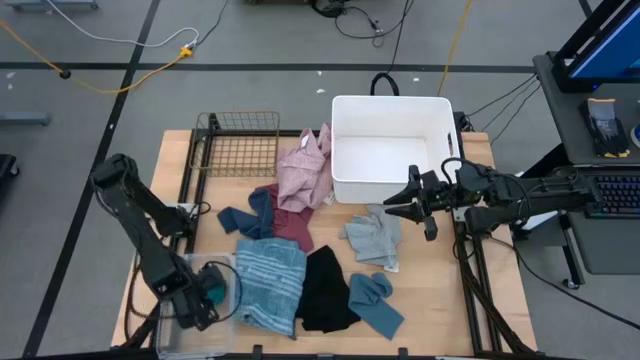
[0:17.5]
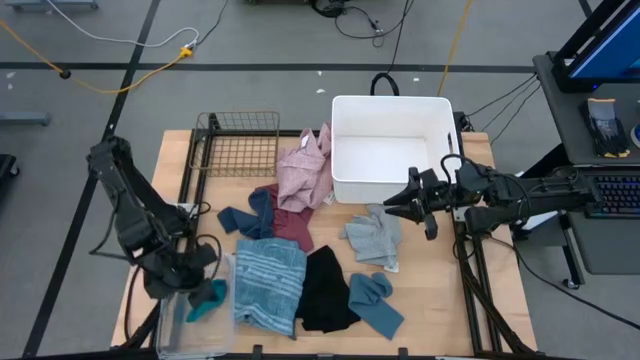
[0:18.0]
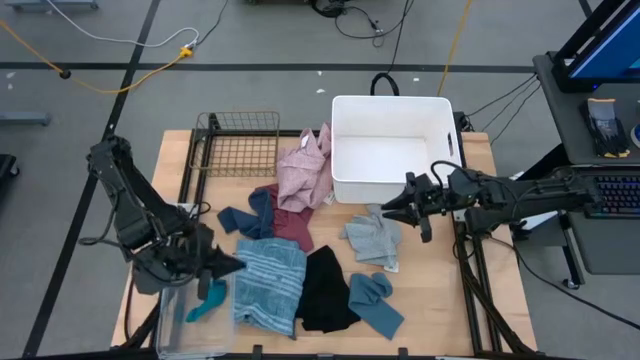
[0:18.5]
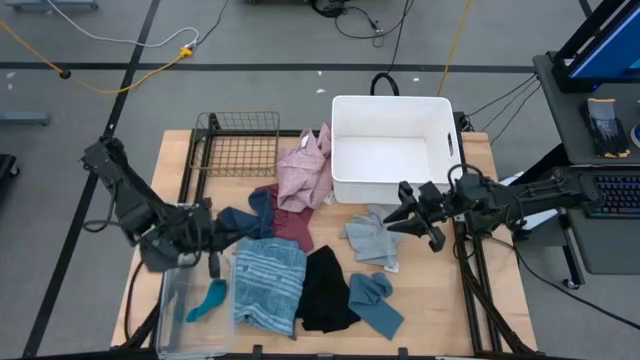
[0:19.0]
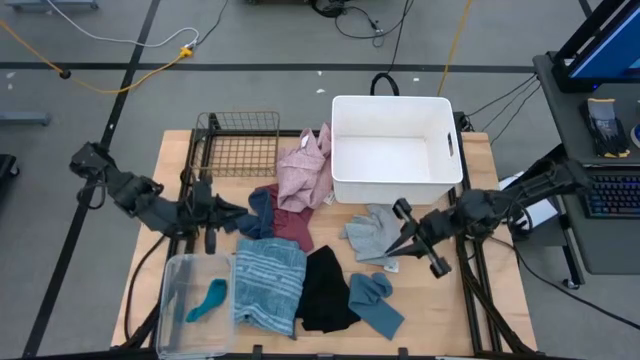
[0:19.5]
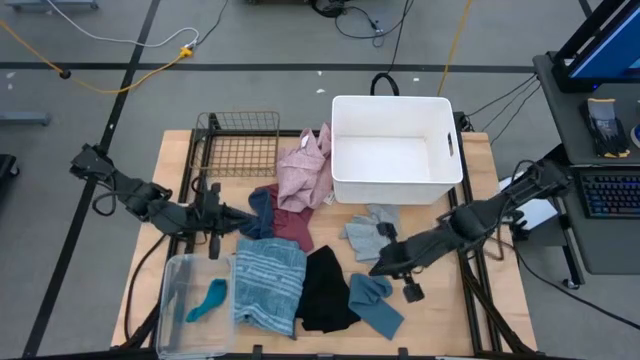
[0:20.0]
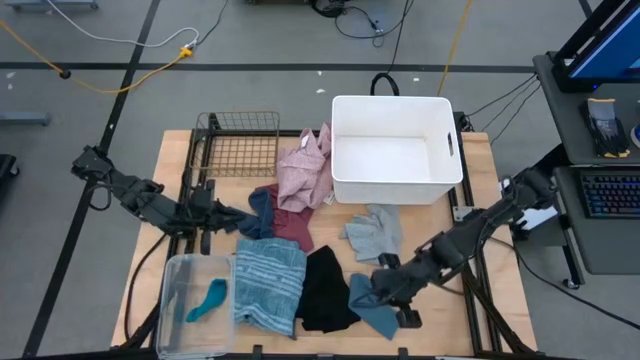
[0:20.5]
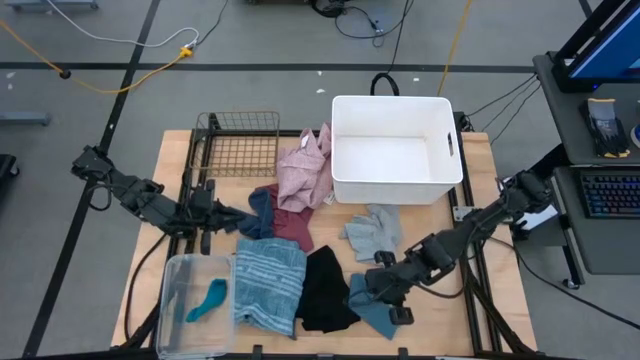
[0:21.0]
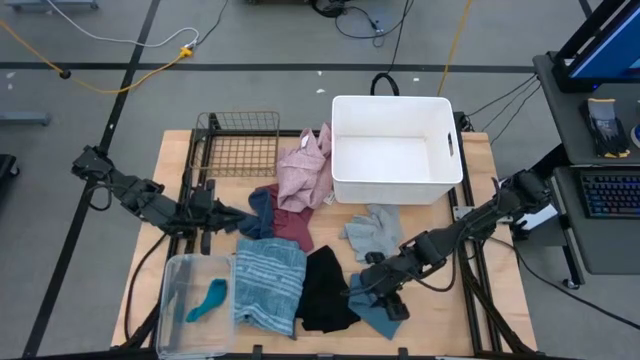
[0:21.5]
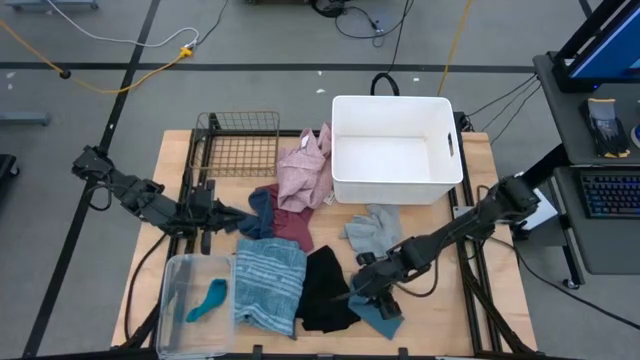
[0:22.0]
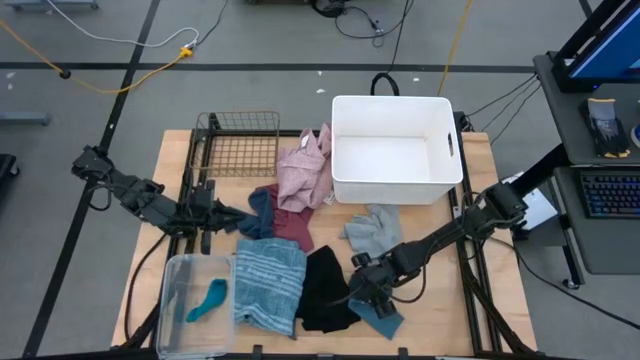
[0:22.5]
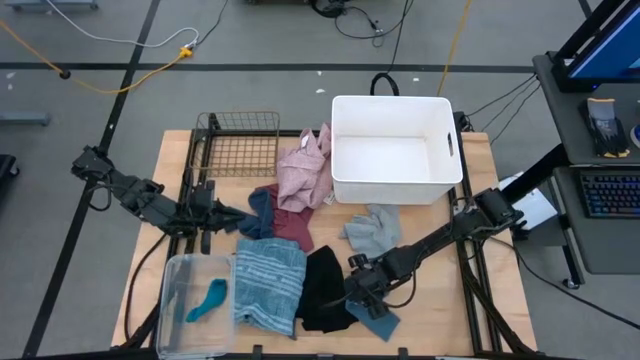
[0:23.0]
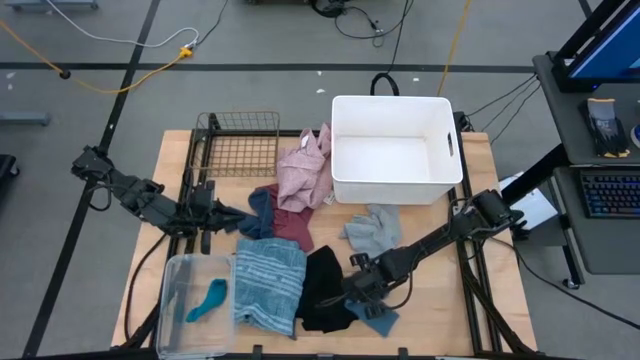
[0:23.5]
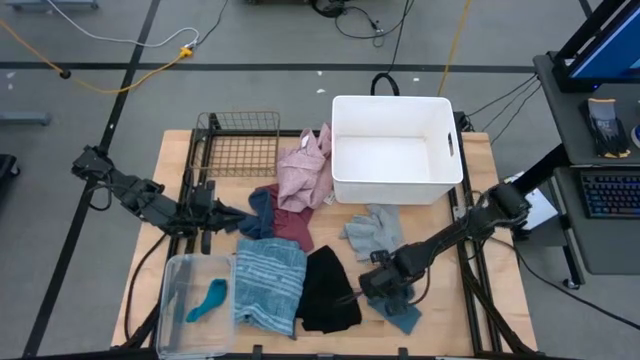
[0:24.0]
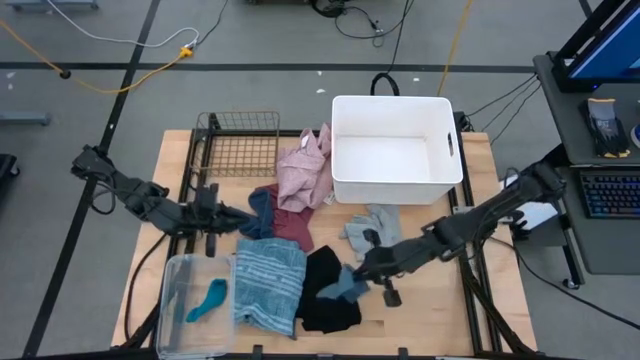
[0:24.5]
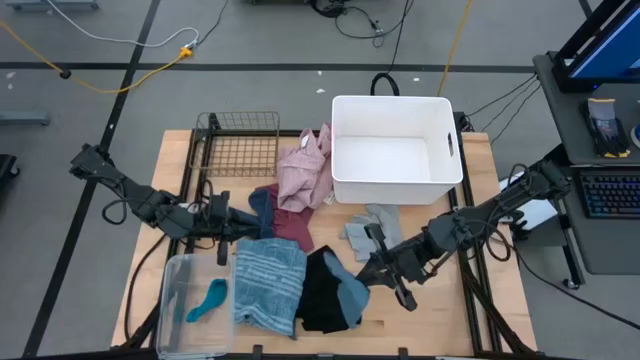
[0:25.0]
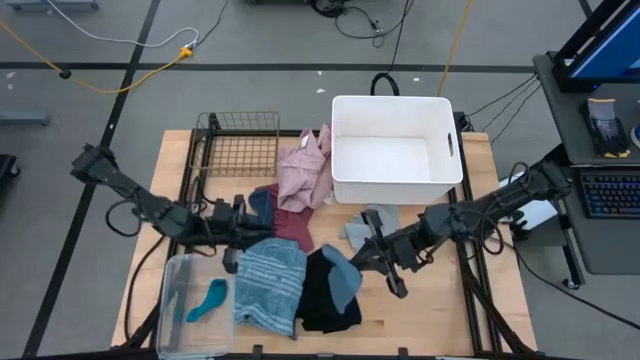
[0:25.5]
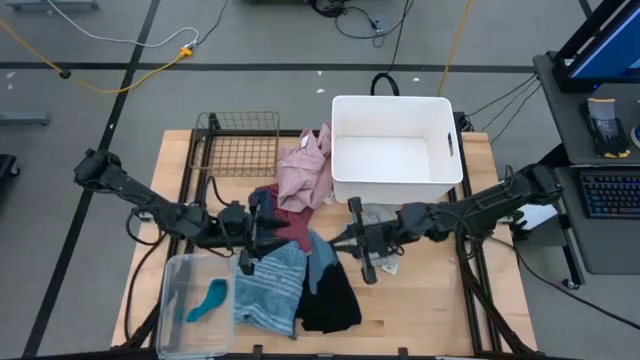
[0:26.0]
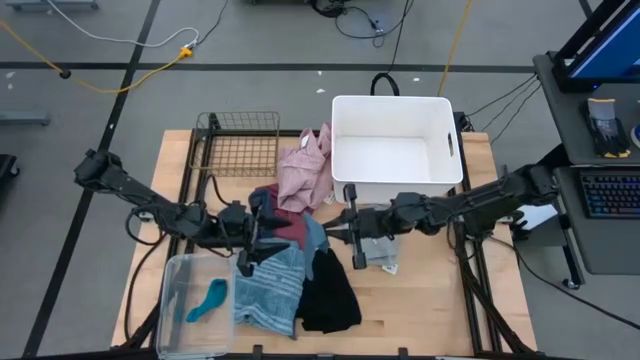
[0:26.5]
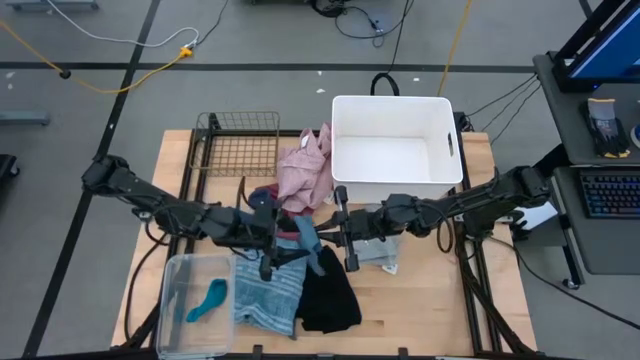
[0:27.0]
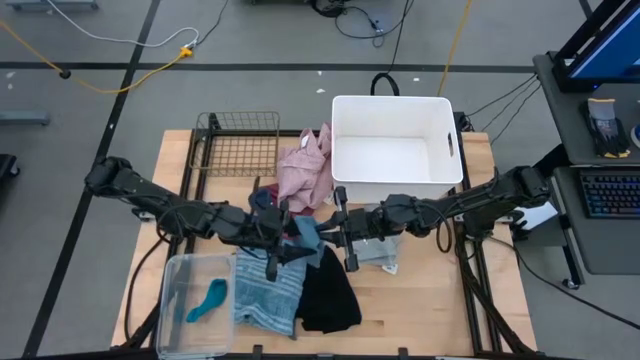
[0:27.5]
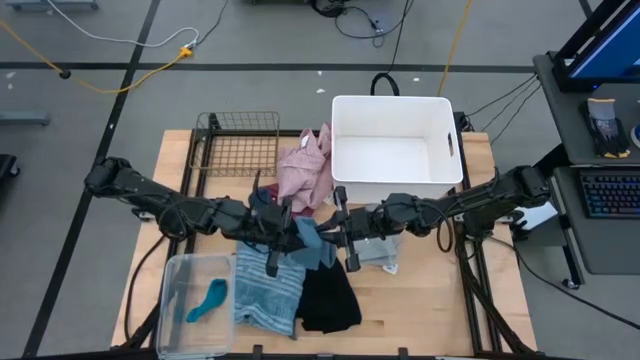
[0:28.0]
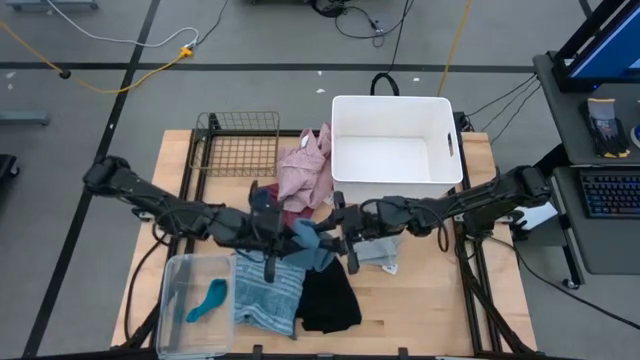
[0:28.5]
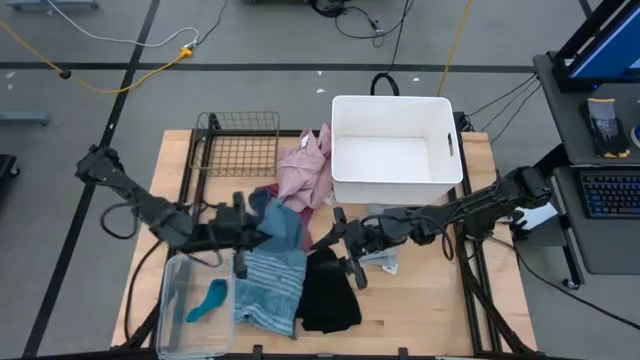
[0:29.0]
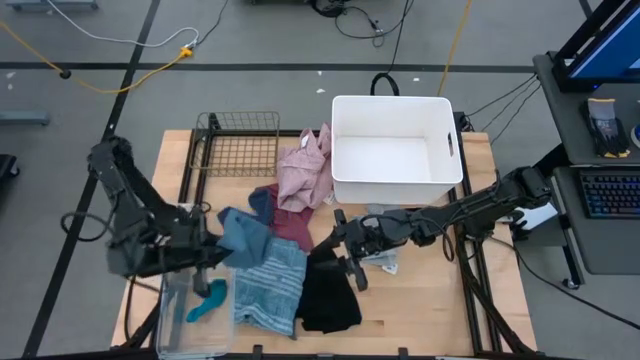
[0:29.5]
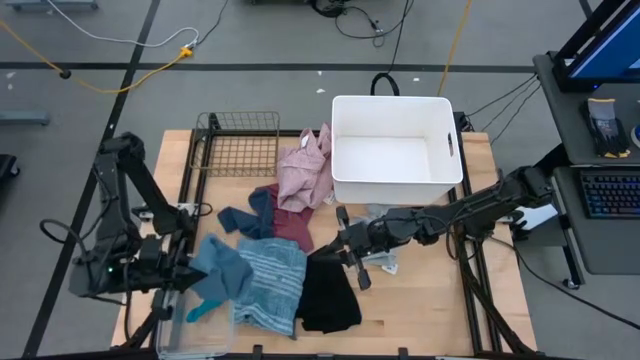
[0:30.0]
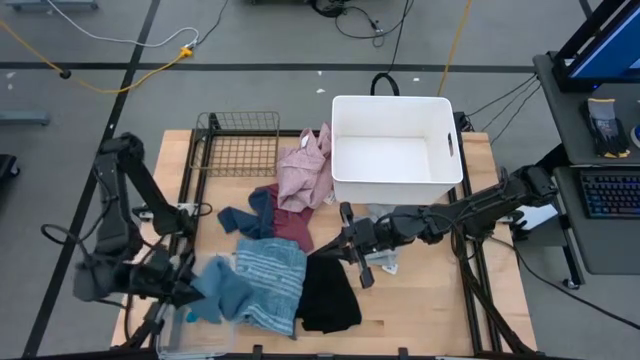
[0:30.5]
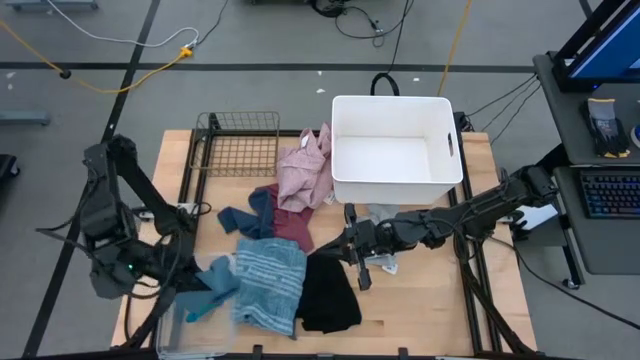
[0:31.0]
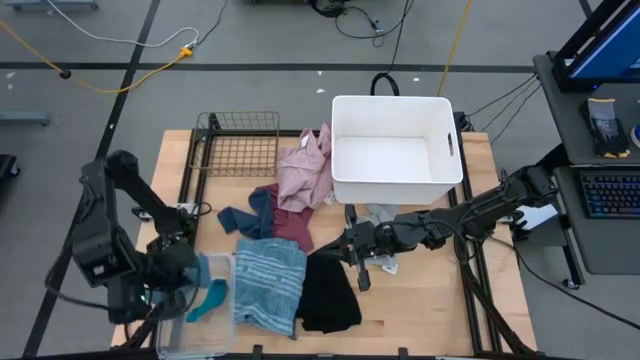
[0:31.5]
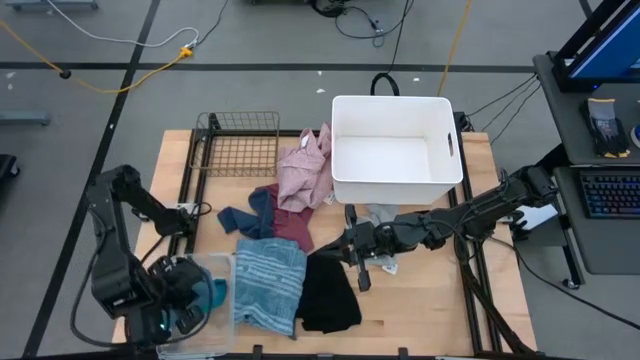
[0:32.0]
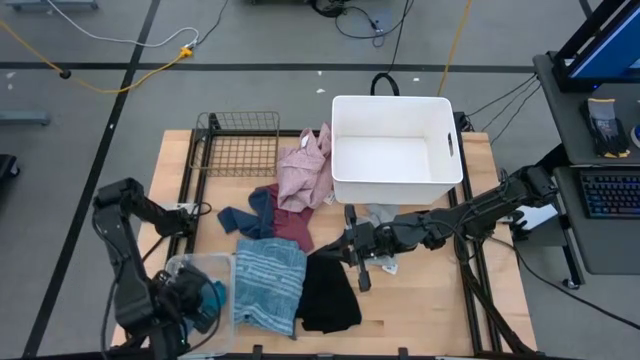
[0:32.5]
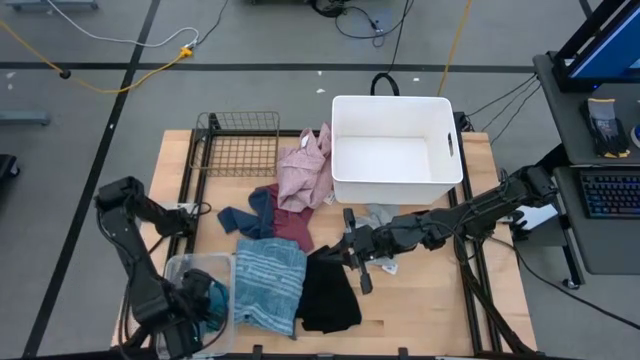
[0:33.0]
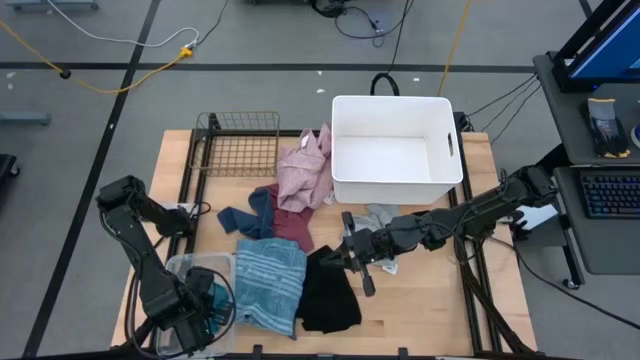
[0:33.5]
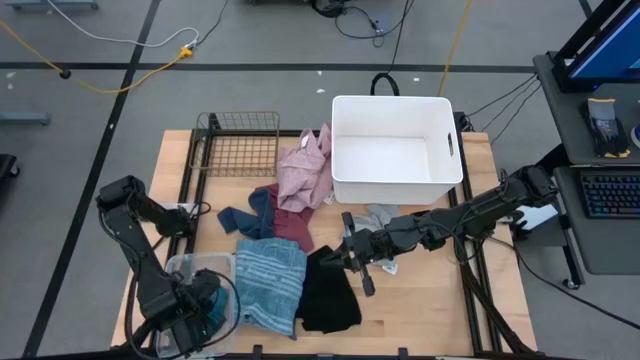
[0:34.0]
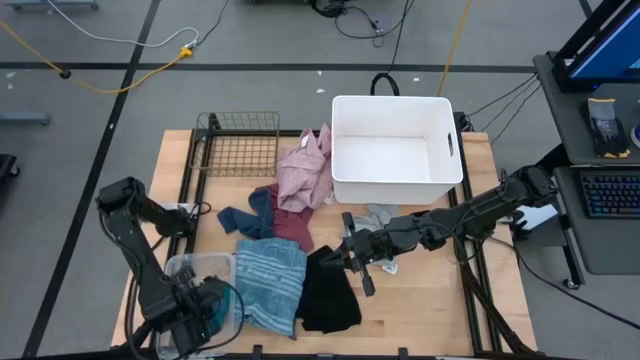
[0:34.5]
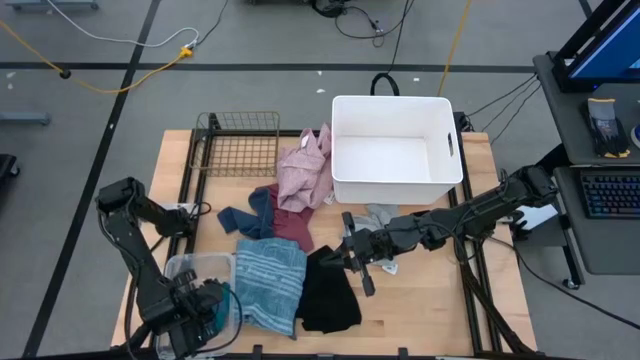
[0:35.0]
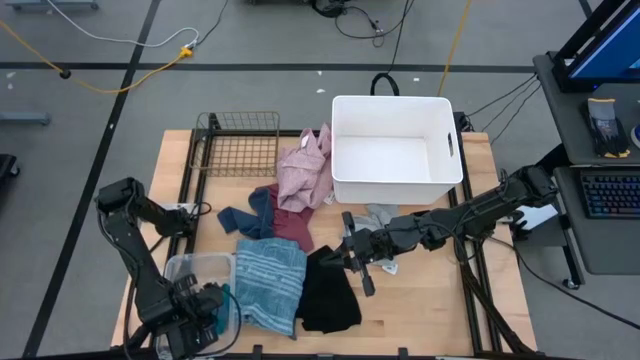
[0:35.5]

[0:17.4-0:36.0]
Task: Pick & Place Cloths
Put the bottom blue sock into the transparent bin
